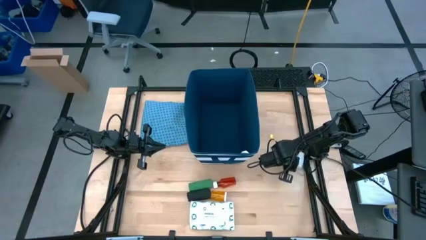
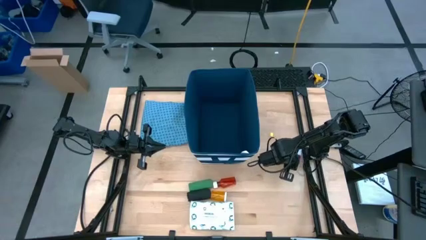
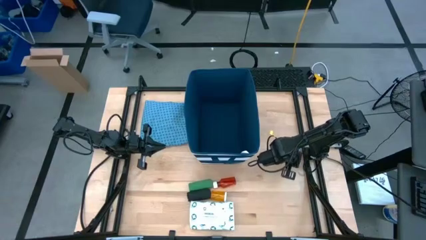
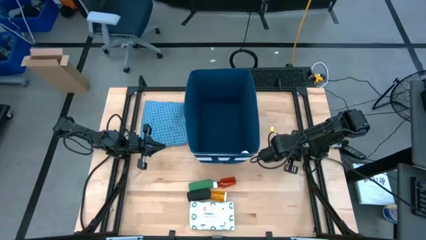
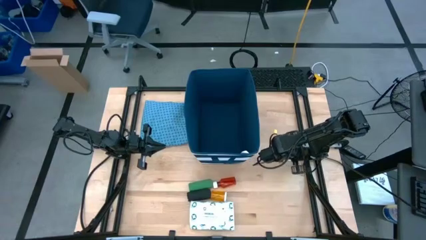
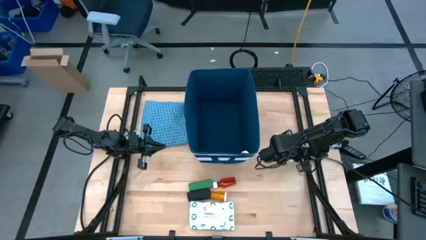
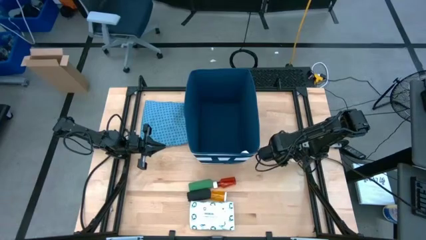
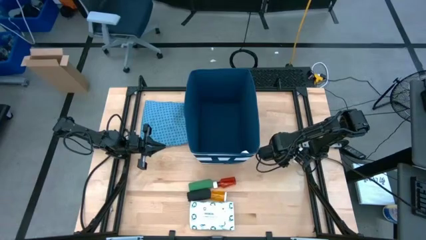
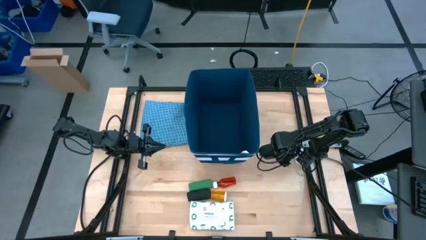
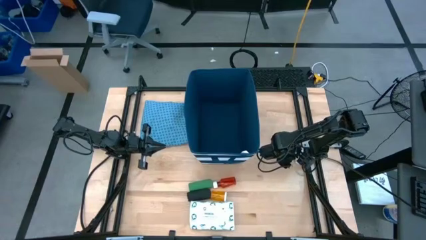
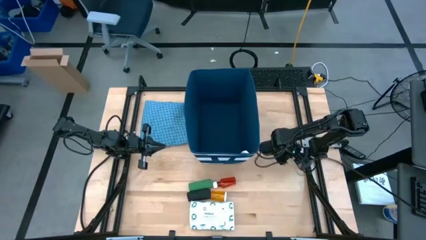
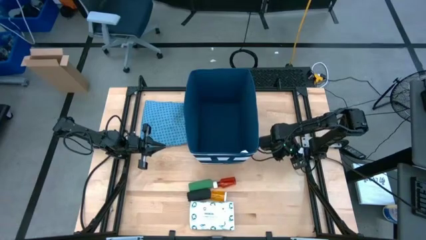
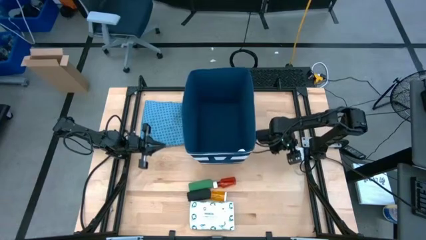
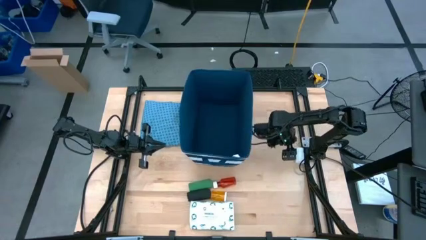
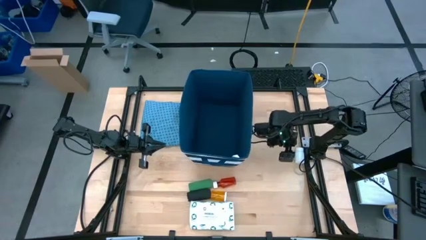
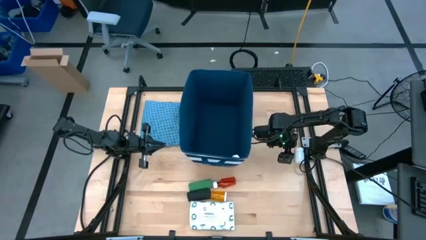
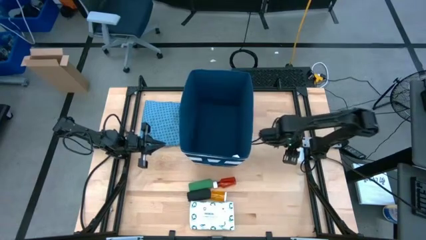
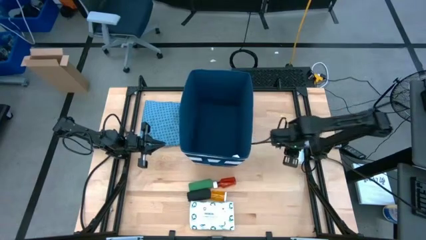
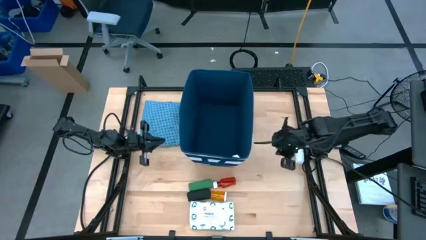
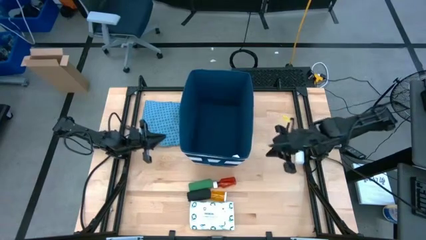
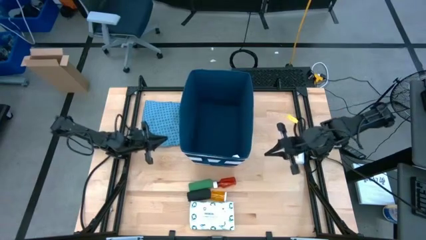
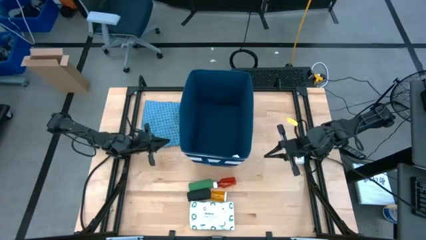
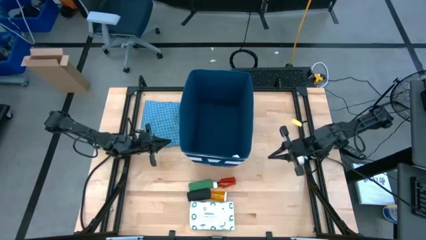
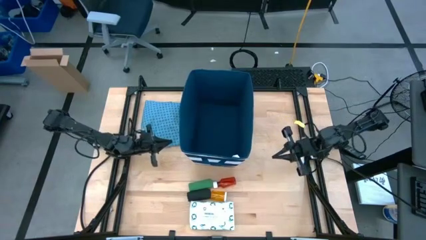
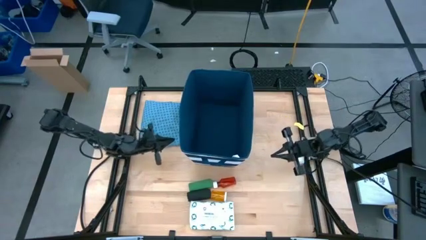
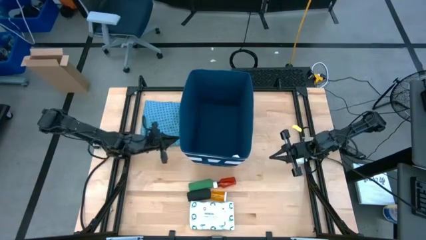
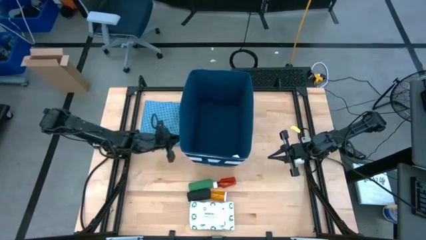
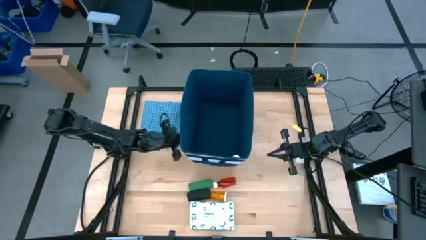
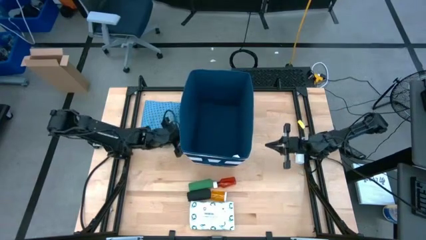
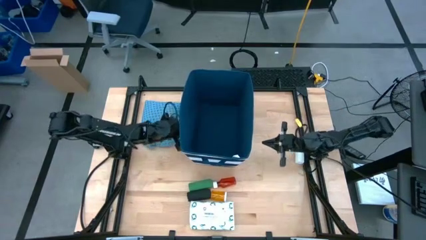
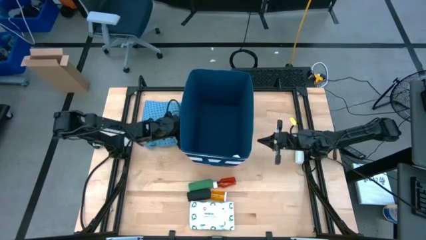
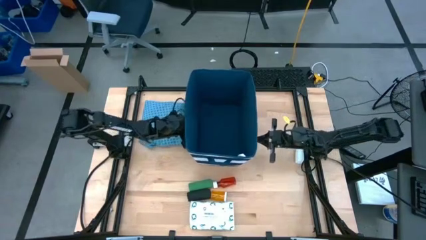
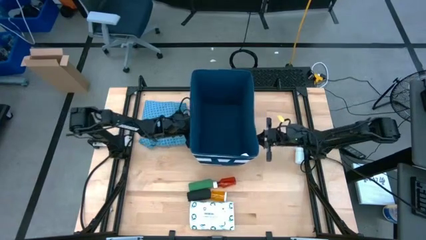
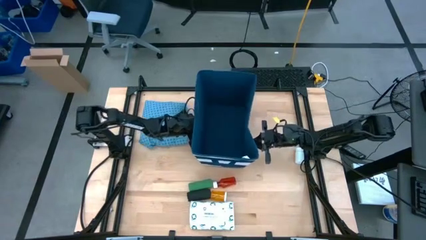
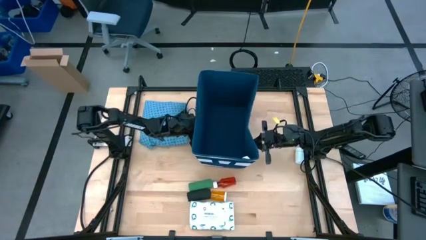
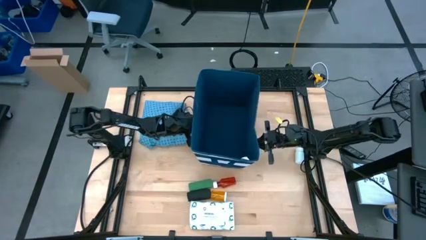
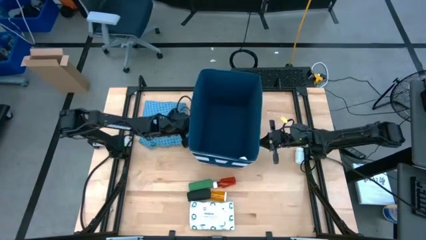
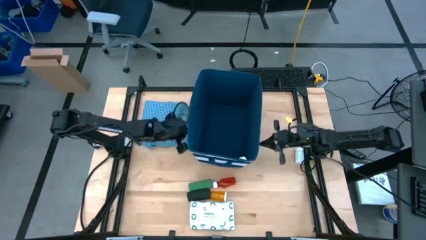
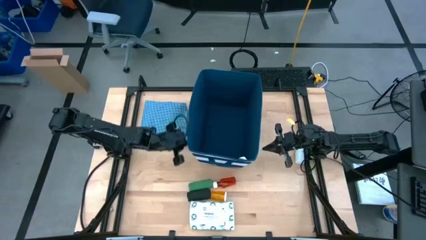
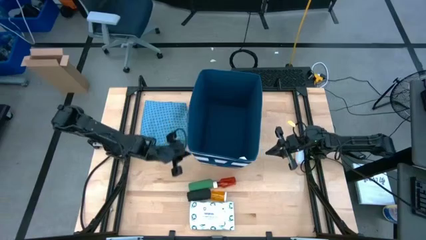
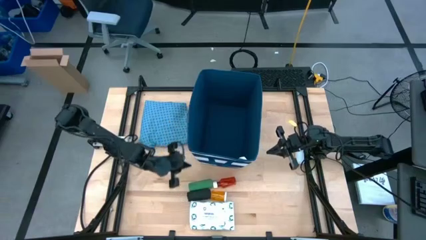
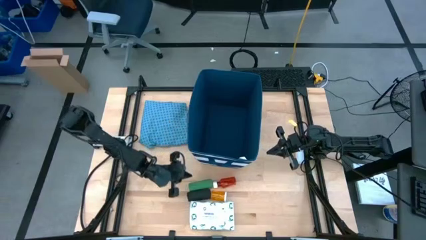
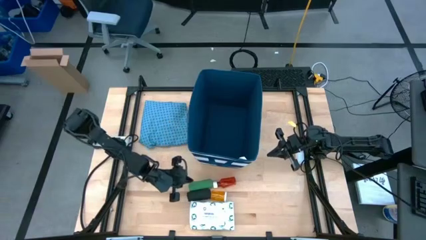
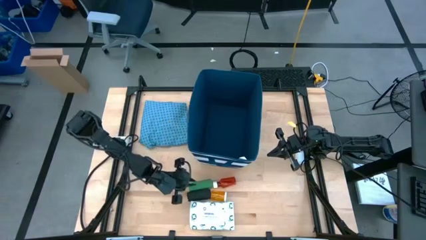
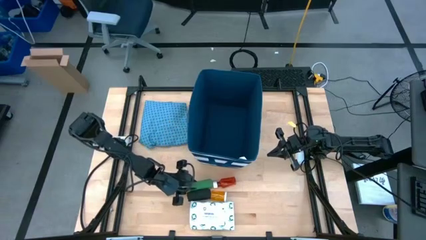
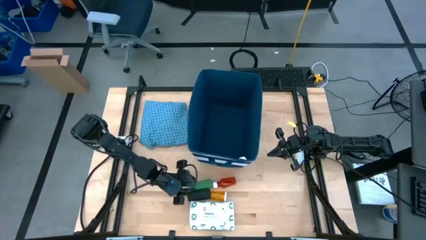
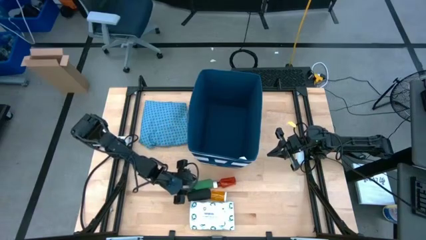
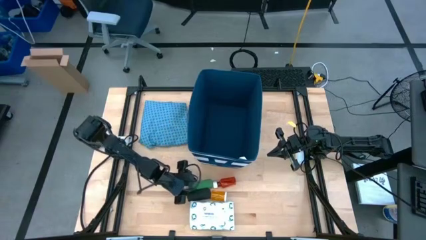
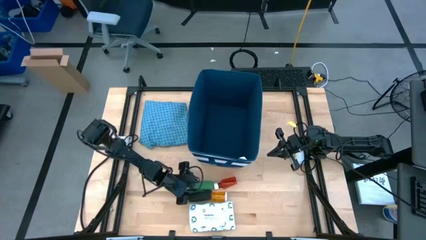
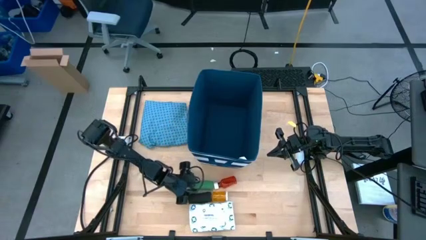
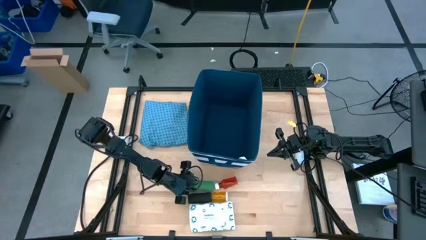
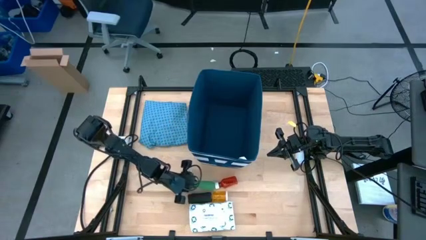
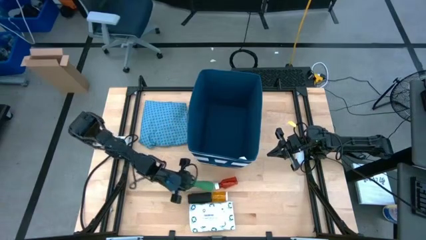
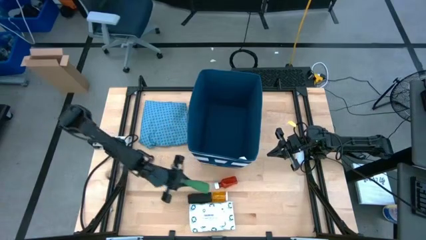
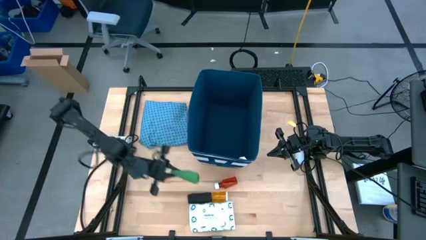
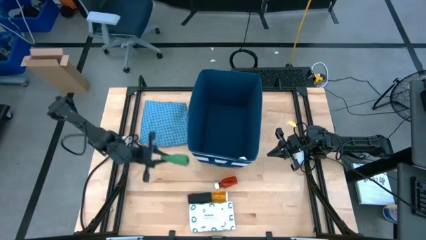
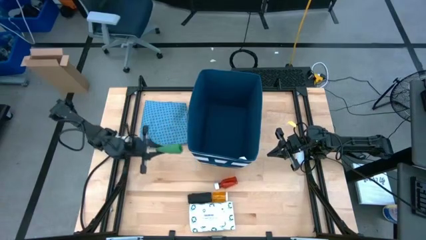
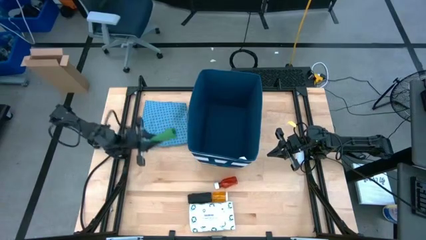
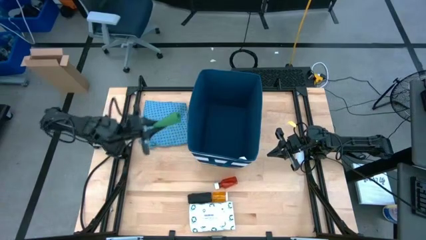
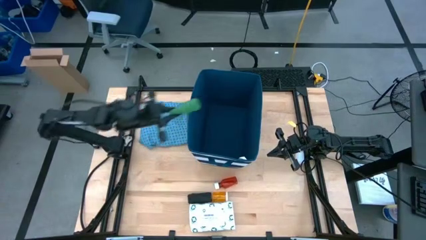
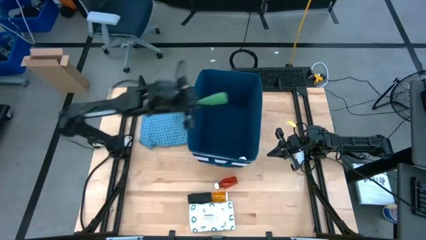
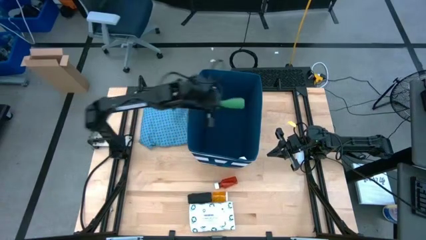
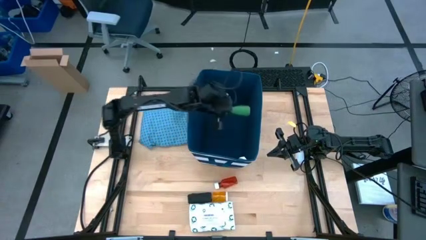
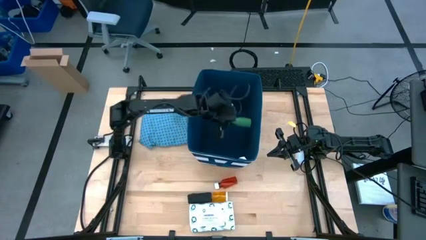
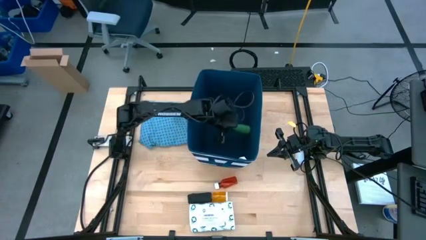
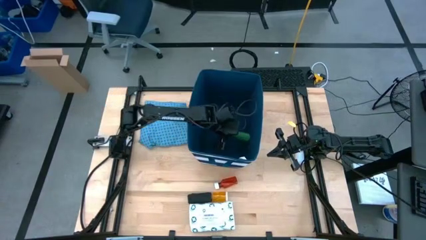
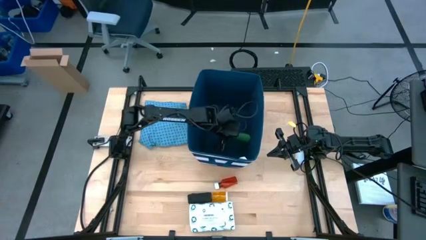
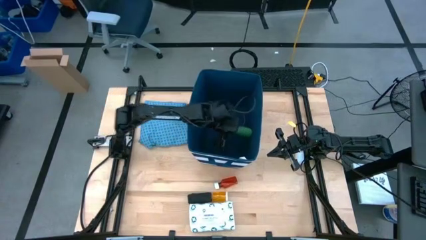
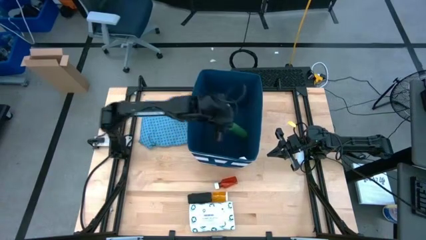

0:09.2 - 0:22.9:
Task: Pick & place medical supplies in basket/bin
Put the green bandage into the blue bin

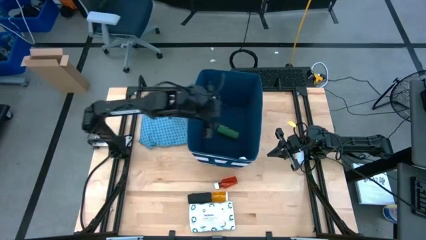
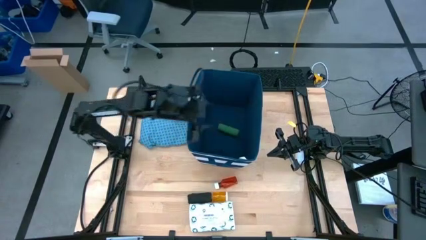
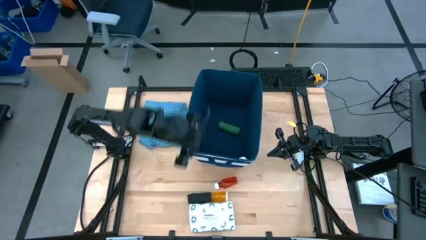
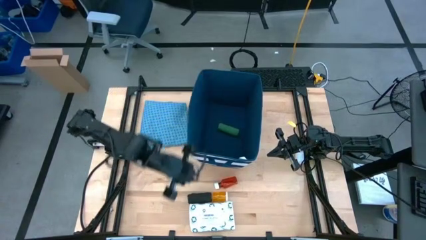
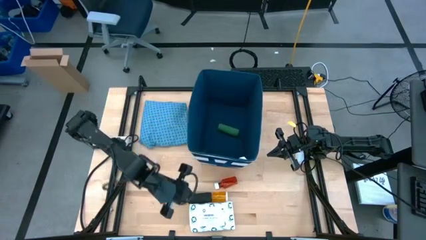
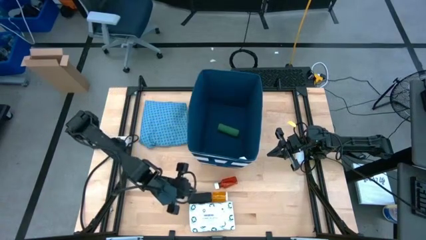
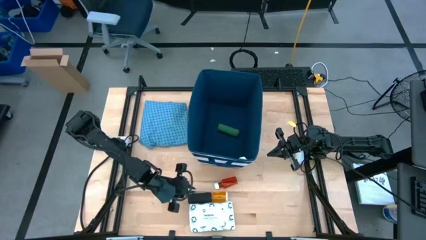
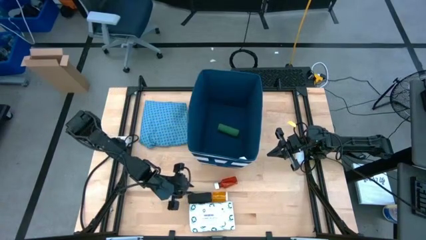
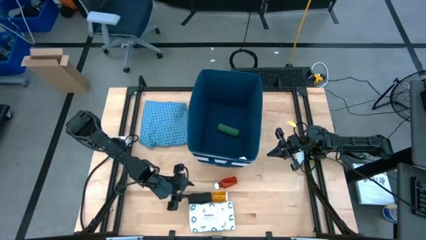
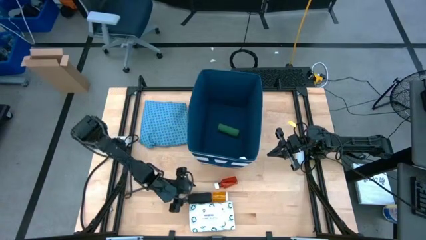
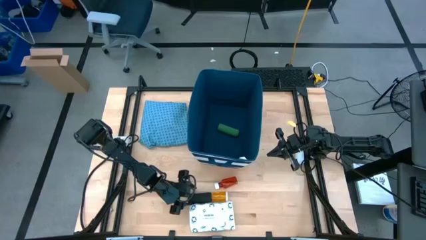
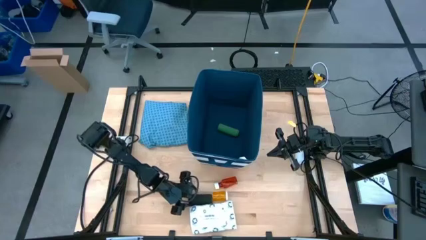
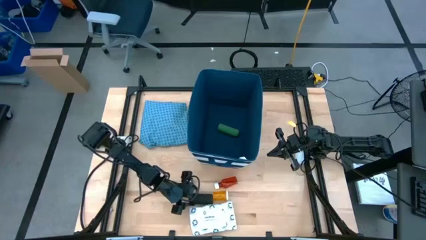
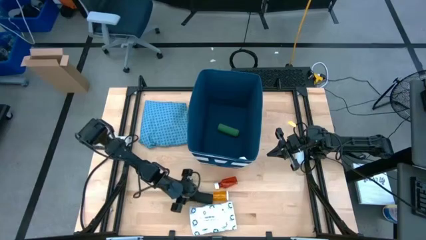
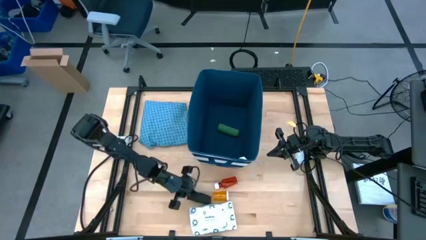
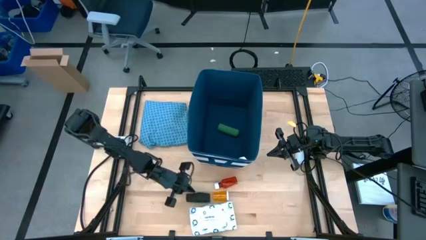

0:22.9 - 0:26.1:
Put the black bandage into the blue bin
